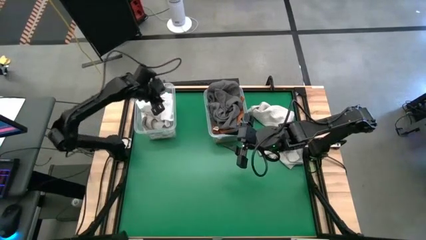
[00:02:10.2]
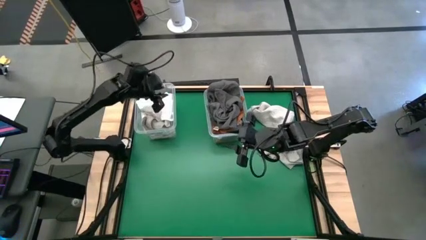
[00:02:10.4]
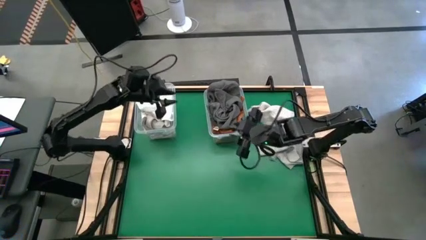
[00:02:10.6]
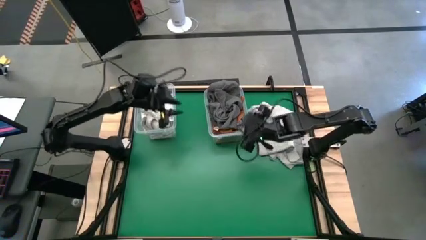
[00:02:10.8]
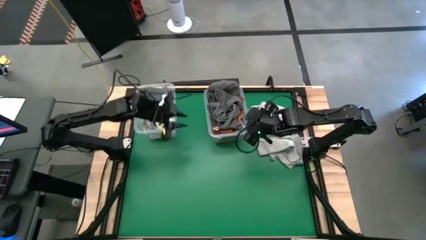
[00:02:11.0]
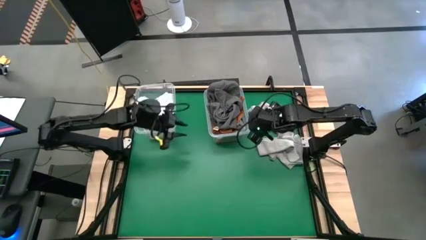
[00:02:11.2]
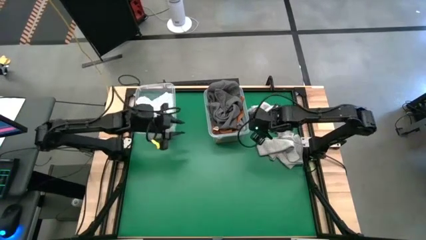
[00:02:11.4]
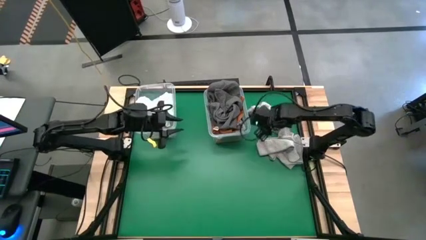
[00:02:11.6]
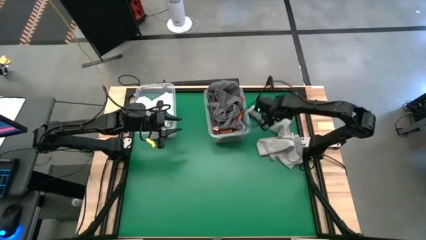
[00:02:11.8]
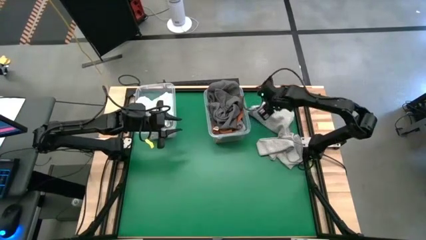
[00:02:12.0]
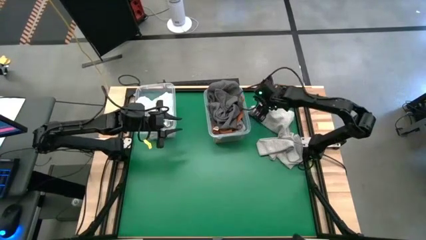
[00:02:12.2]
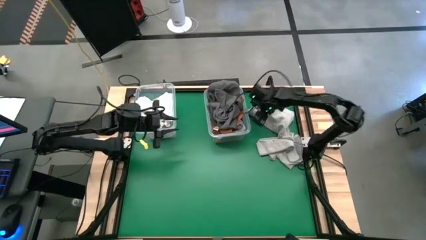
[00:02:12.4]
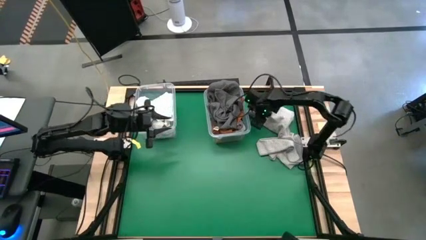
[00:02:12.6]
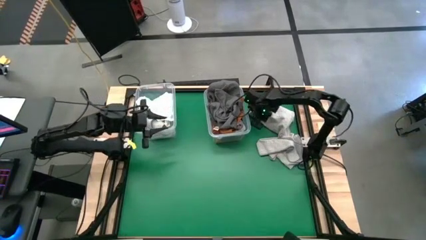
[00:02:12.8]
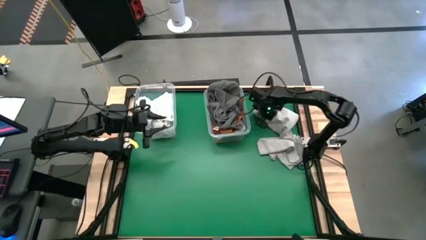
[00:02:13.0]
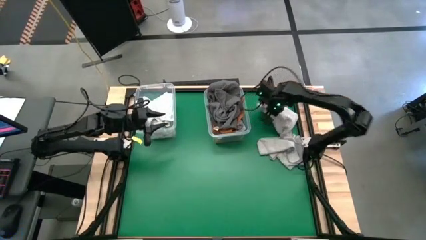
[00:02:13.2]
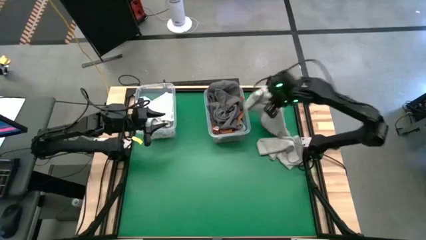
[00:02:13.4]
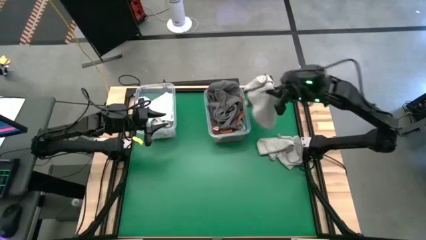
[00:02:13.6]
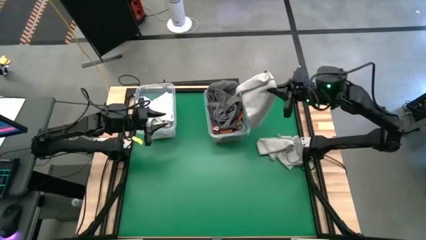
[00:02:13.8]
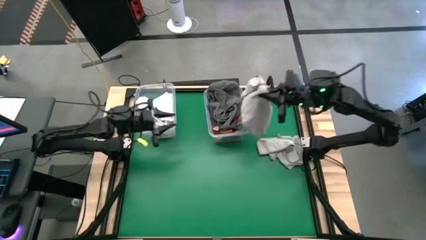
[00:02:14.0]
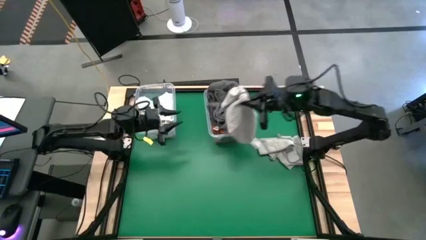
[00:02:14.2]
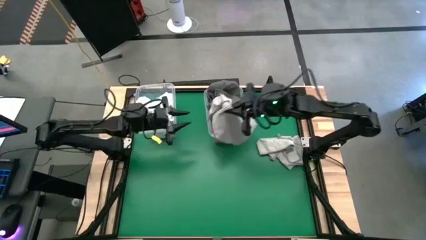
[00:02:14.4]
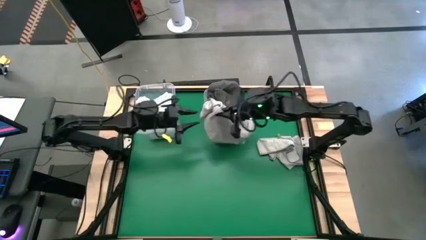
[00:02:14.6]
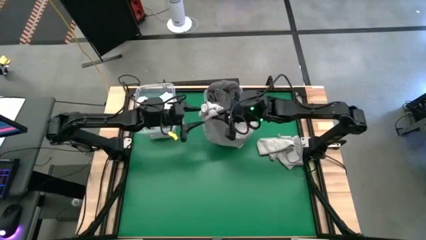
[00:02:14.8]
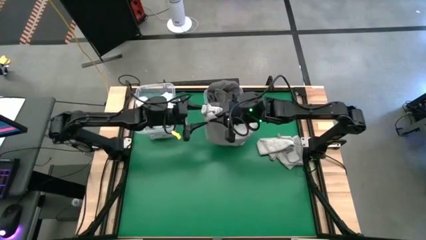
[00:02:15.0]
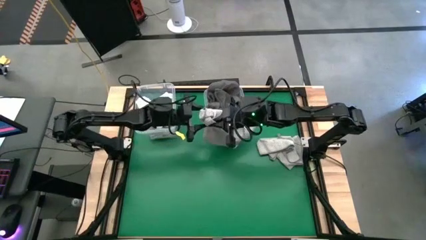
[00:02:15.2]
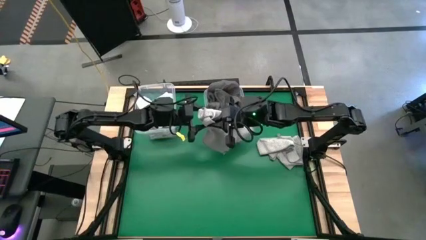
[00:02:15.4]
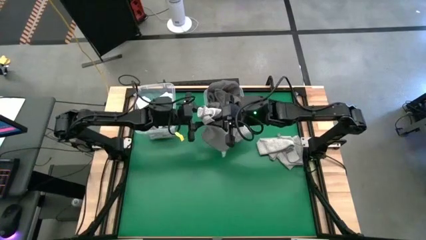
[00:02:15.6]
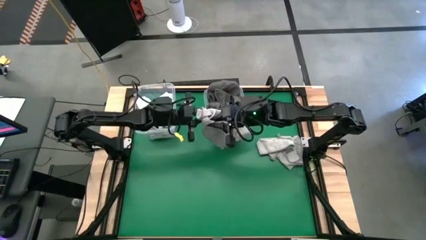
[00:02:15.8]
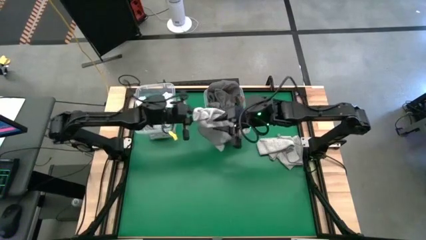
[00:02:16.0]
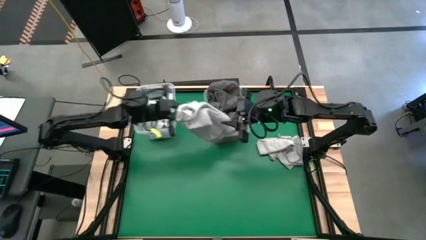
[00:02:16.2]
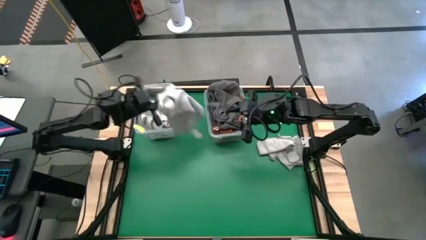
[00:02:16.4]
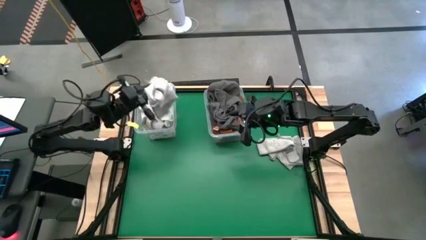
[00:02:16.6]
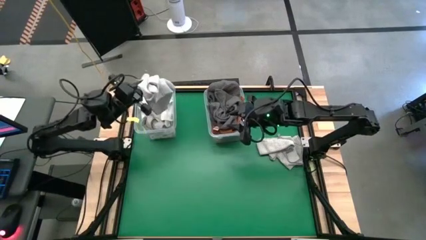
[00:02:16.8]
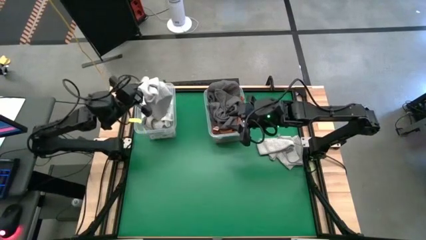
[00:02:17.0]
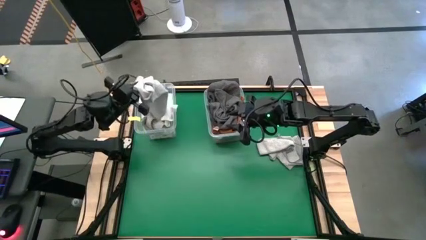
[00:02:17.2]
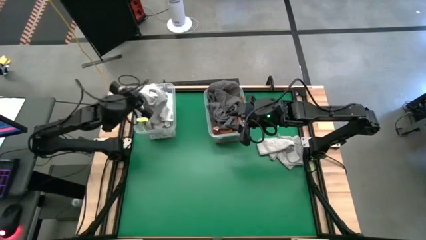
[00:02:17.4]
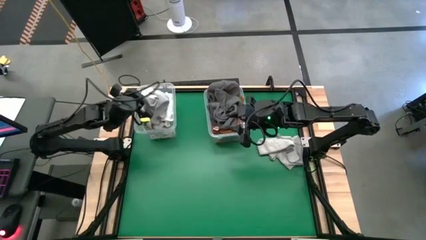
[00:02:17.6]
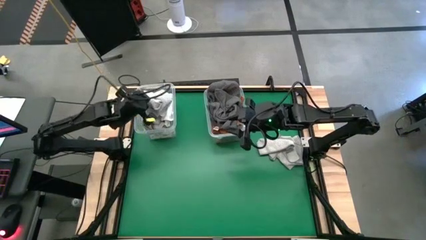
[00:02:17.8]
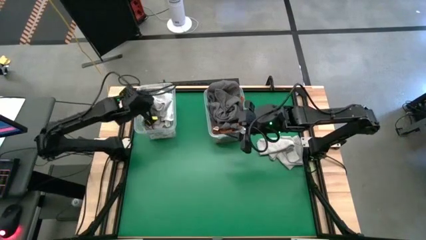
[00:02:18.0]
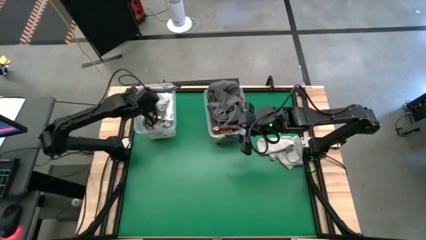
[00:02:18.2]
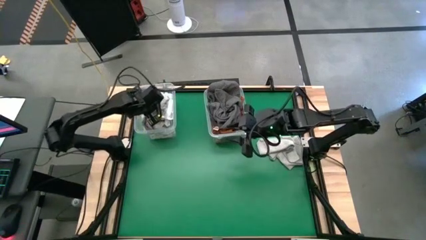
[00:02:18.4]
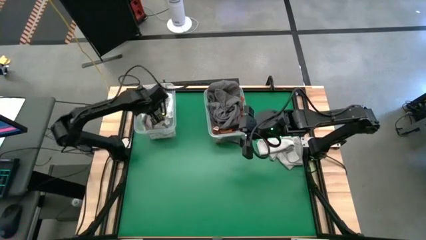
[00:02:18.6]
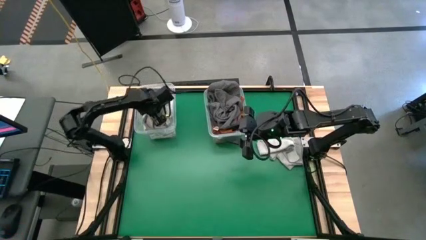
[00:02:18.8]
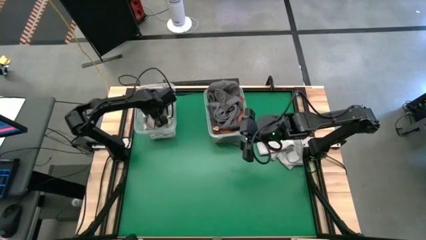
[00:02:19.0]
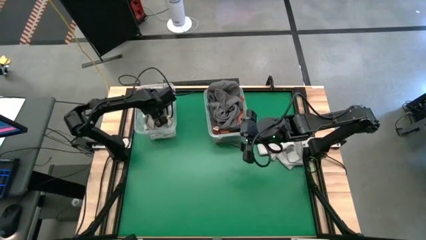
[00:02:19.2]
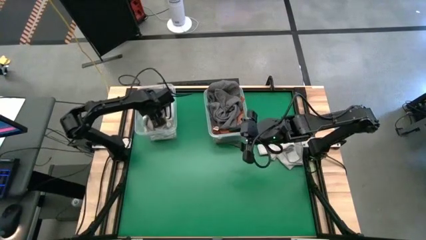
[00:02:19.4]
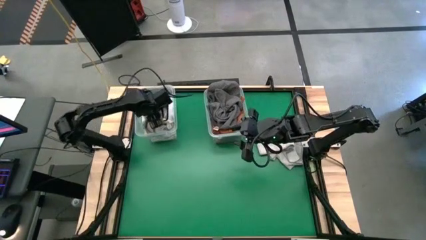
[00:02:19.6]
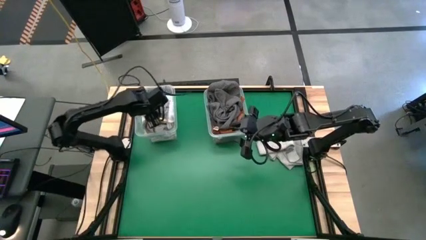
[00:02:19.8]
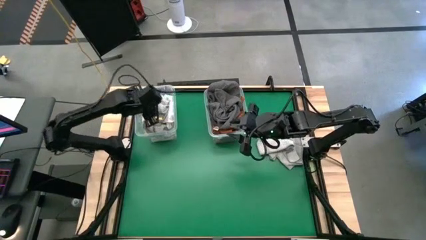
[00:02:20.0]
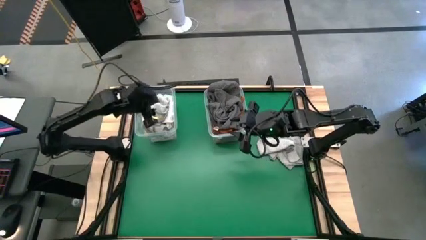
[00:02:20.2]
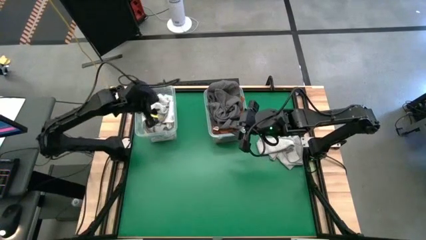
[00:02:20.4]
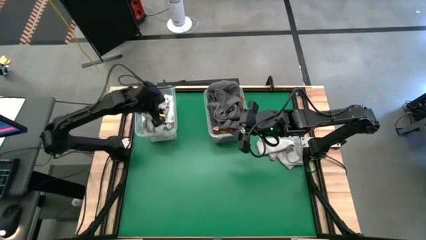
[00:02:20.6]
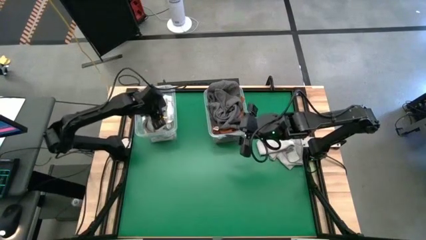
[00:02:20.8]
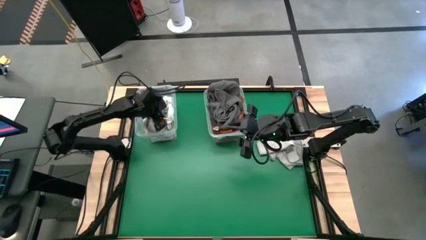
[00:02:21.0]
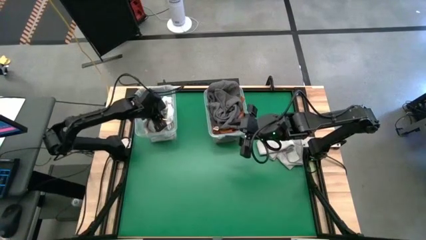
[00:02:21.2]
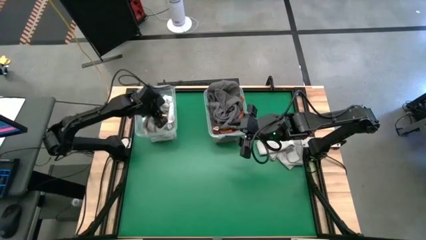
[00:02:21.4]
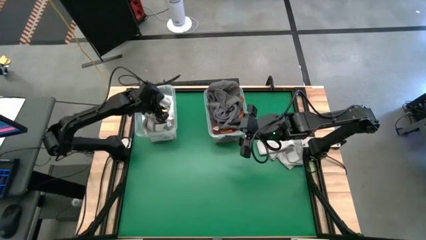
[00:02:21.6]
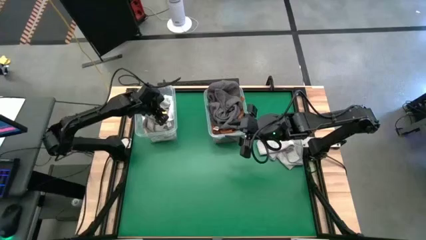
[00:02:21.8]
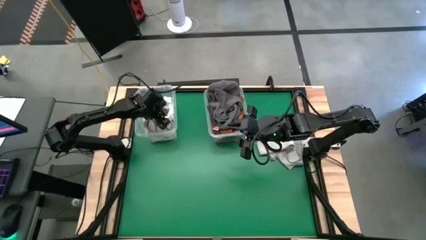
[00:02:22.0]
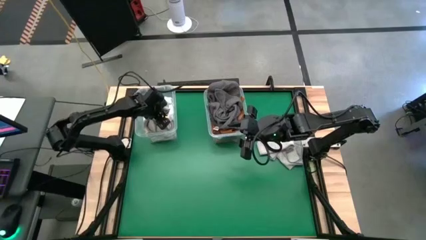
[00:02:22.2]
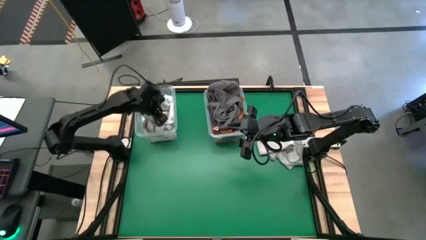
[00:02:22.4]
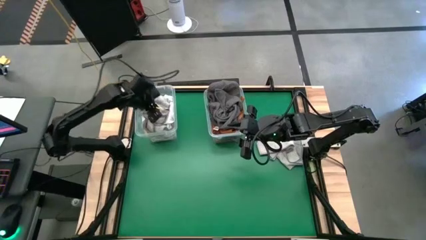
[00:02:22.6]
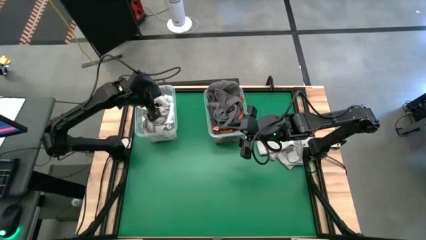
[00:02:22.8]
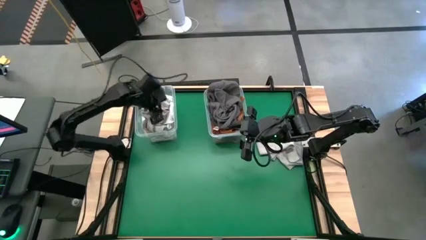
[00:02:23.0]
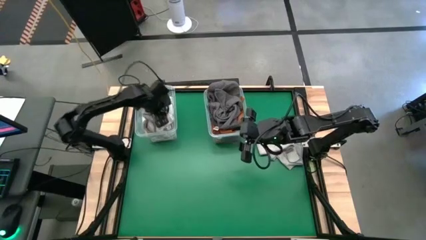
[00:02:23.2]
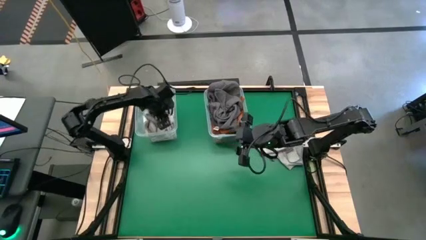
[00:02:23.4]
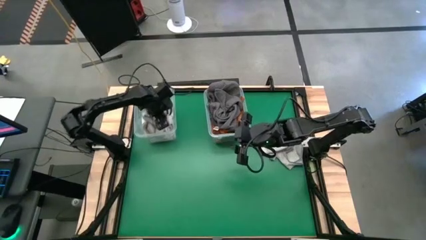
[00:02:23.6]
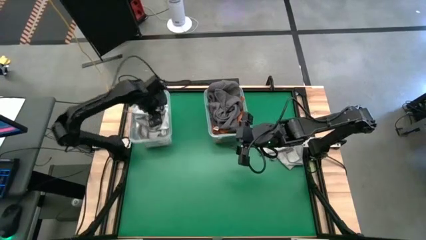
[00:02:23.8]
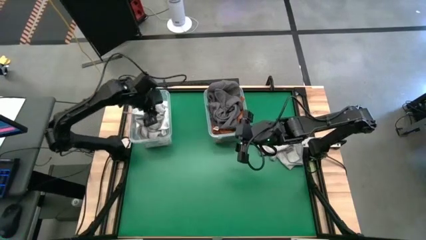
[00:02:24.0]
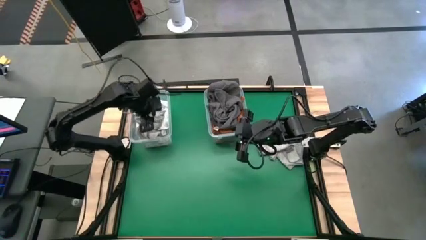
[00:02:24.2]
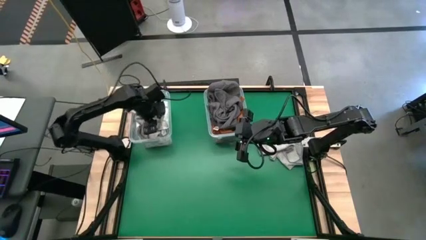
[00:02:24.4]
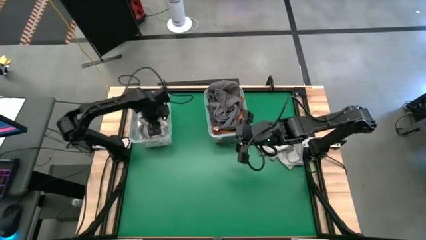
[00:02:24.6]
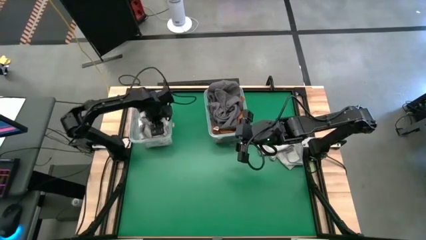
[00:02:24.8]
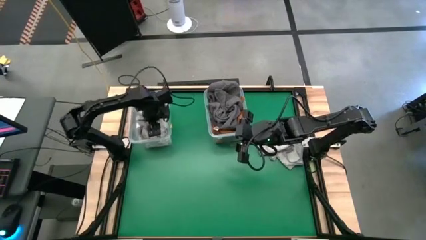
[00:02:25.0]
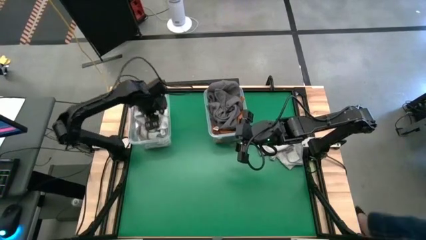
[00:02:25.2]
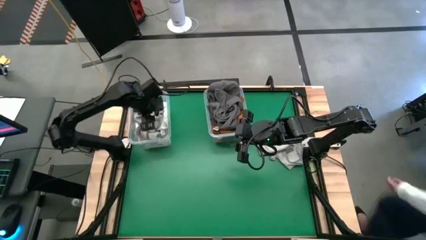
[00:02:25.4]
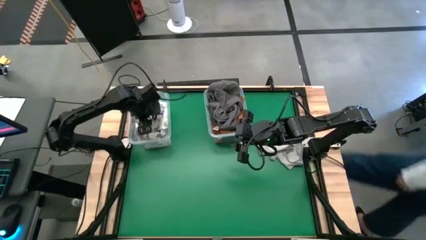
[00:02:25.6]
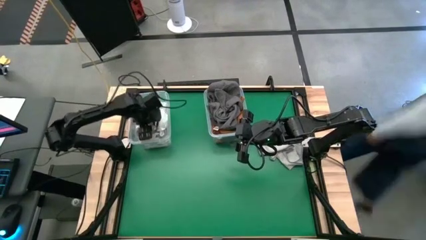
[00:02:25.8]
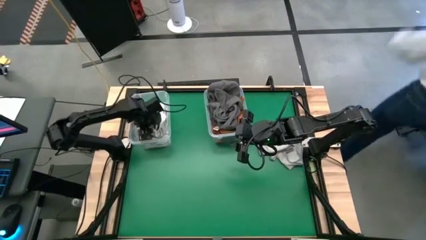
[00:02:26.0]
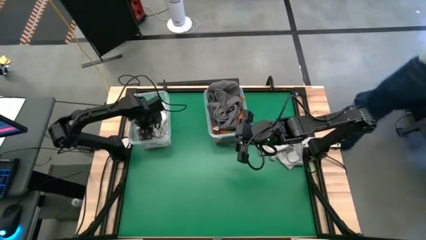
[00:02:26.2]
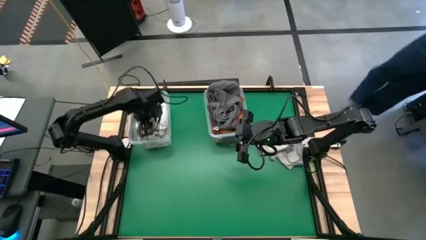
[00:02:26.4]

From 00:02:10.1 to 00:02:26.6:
Task: Sort towels by color in basket
Put the light gray towel into the left transparent bin
